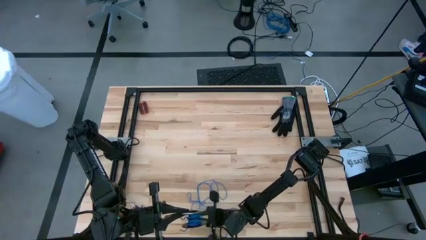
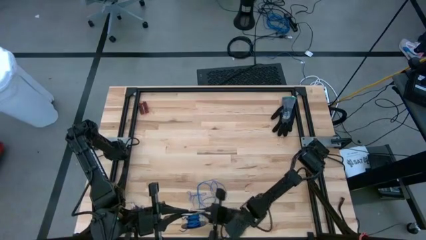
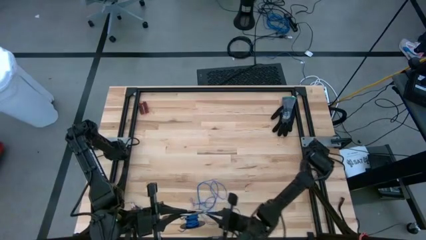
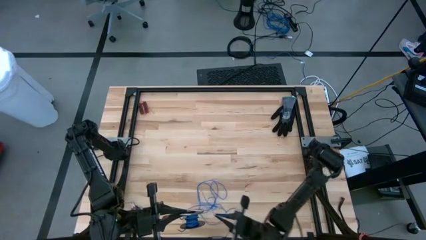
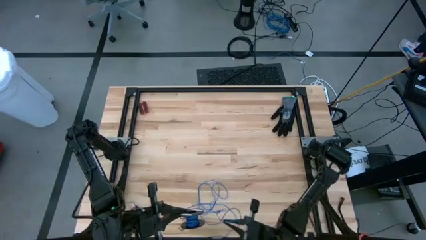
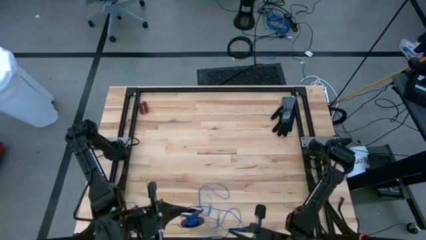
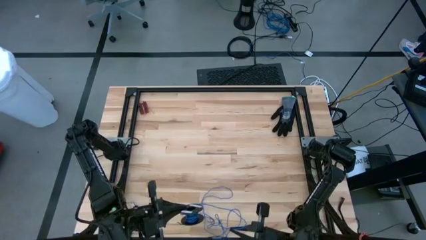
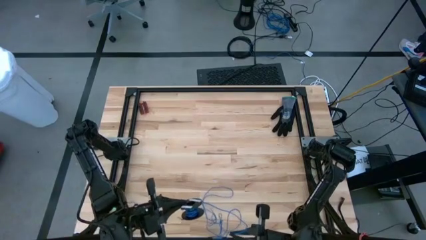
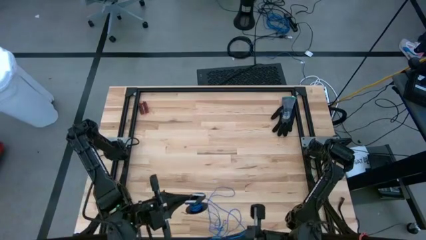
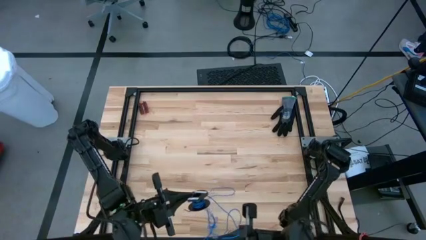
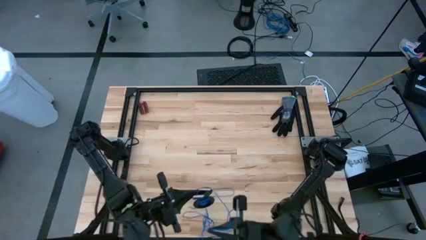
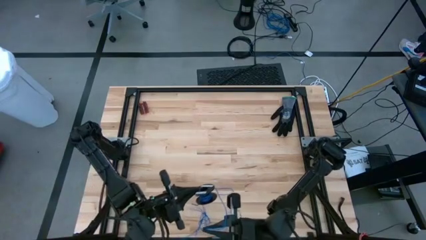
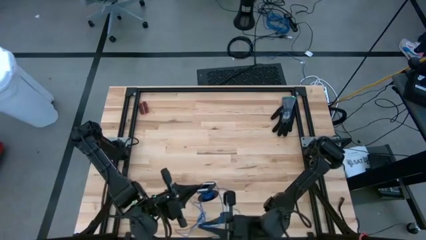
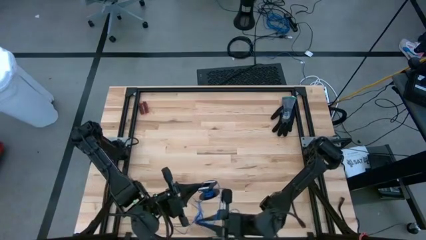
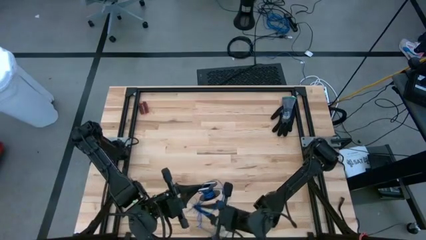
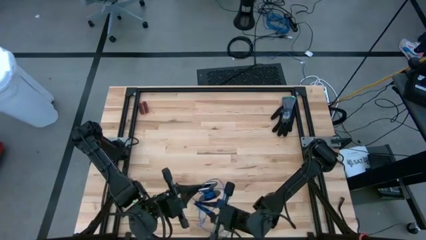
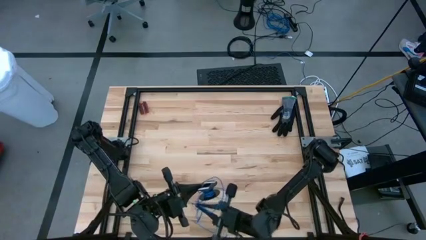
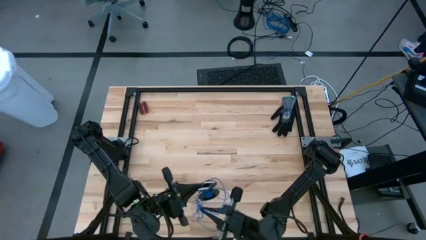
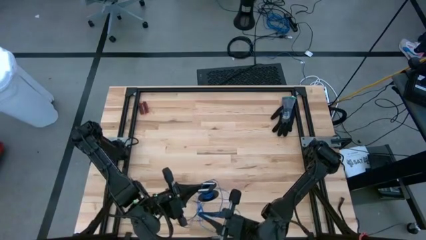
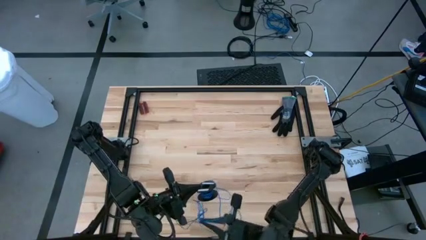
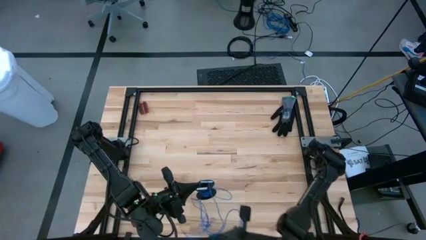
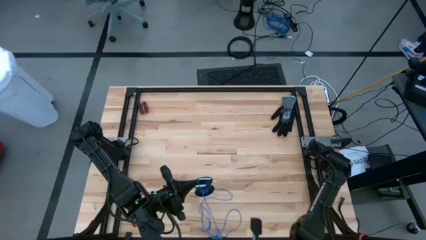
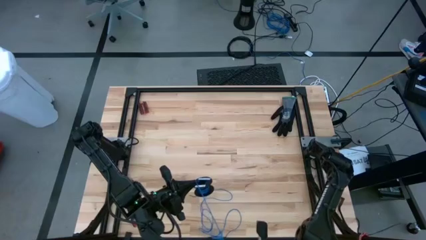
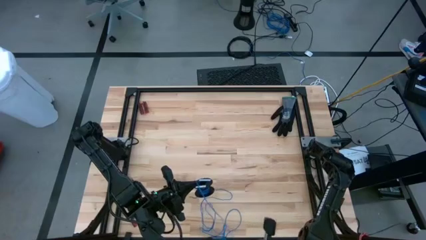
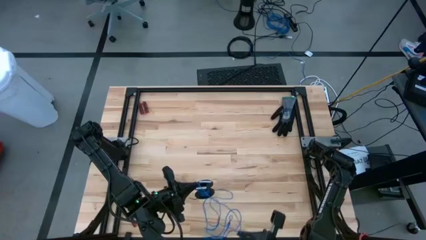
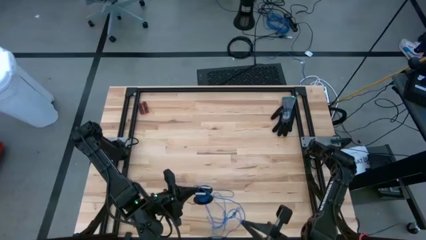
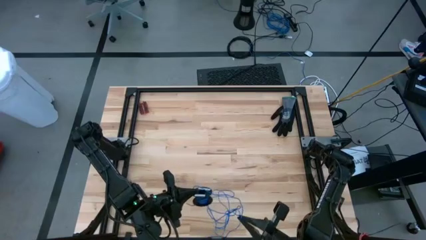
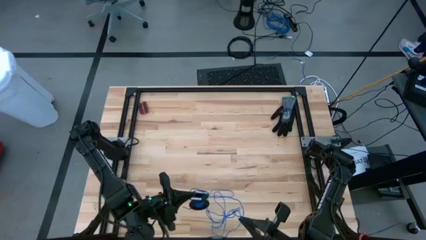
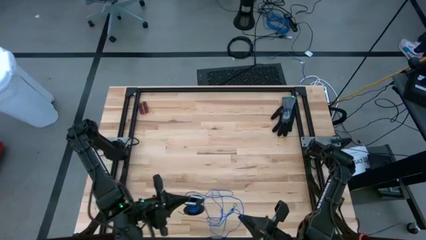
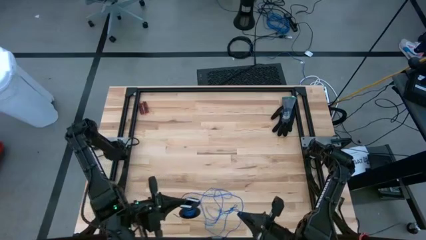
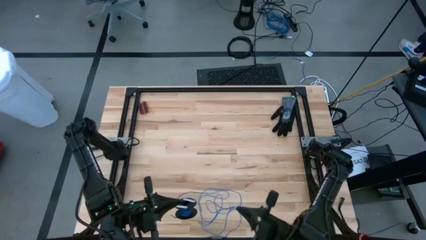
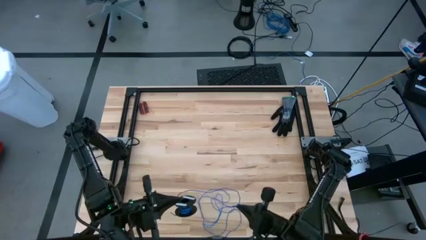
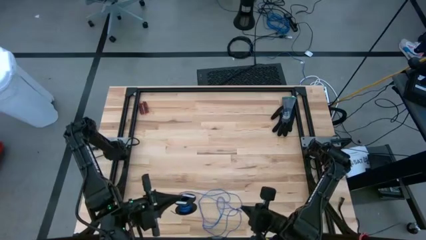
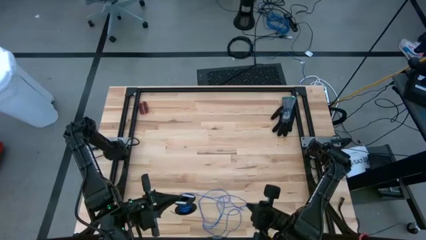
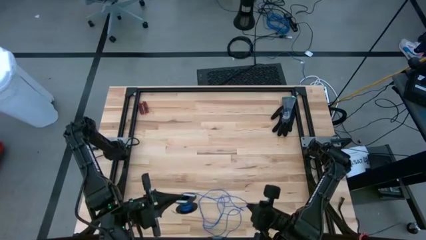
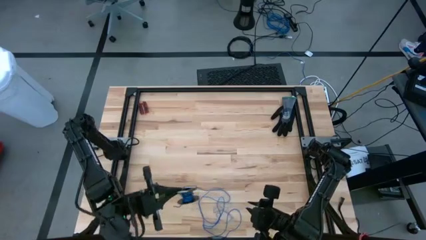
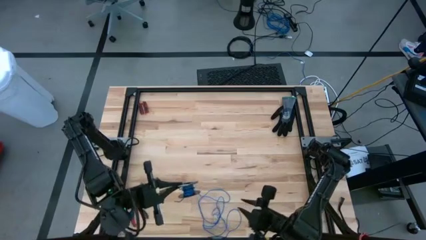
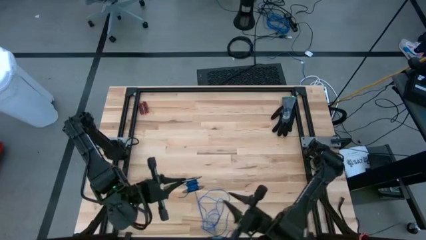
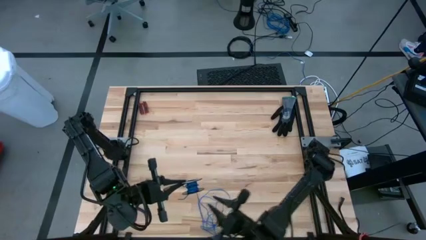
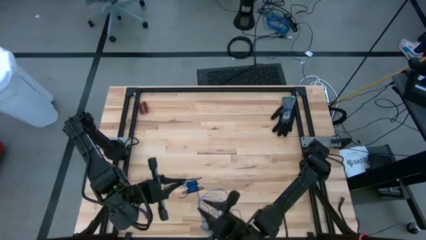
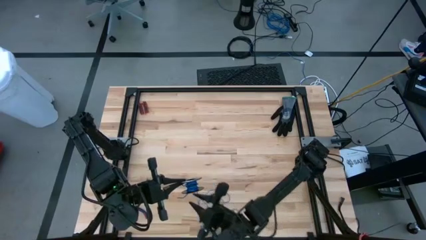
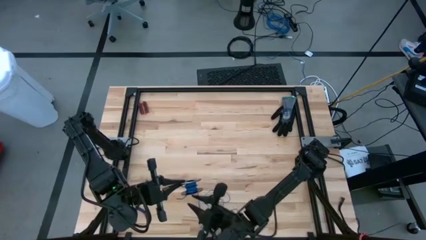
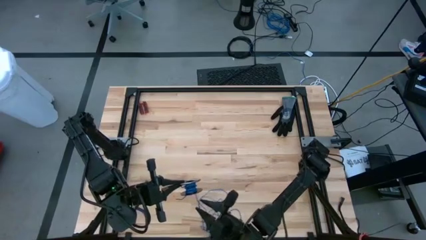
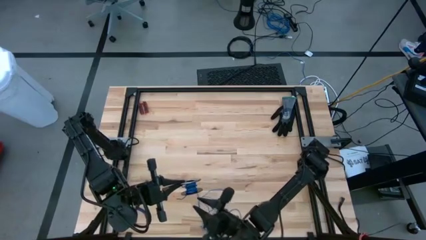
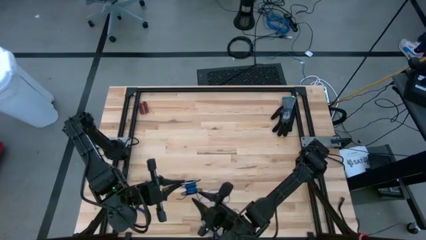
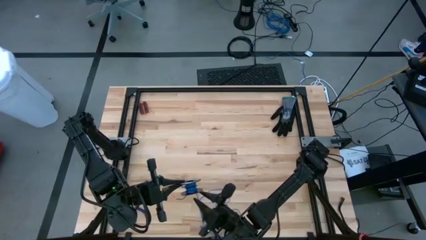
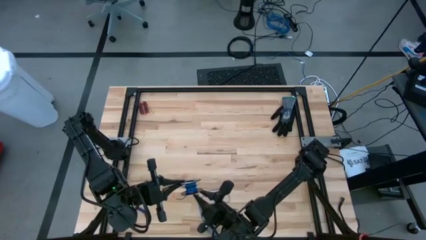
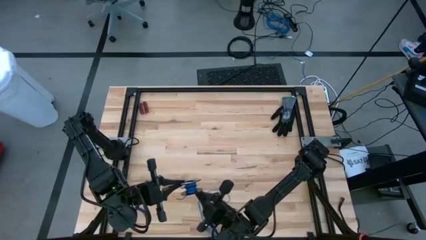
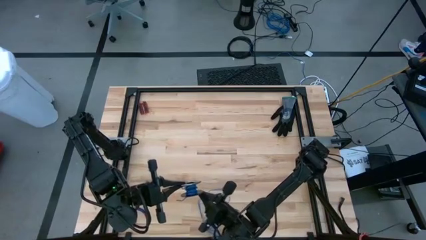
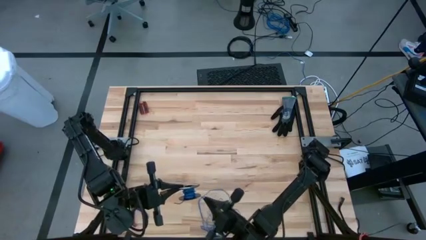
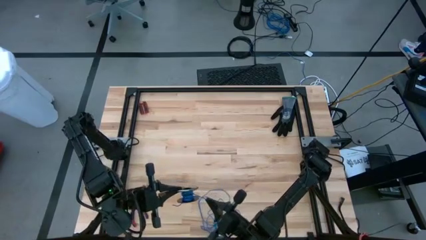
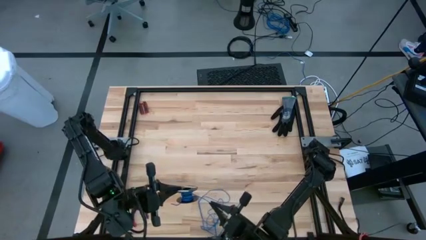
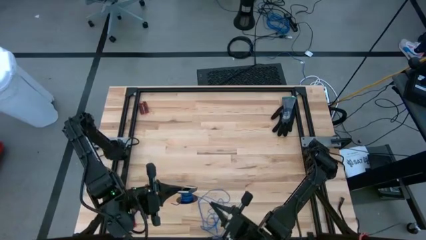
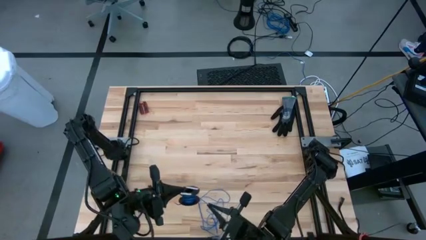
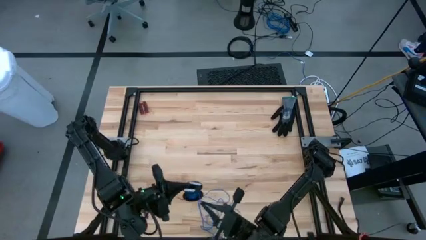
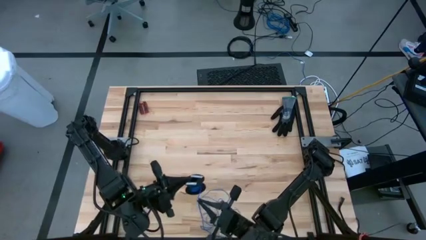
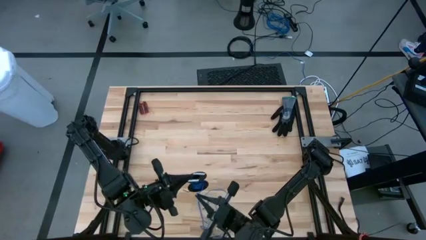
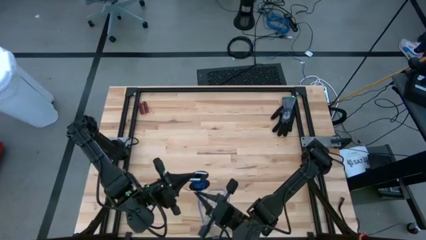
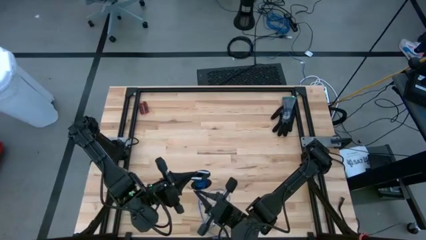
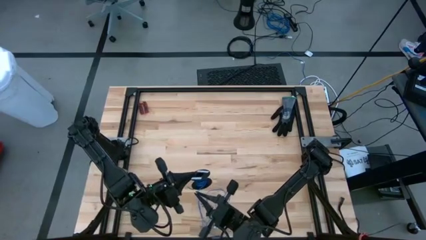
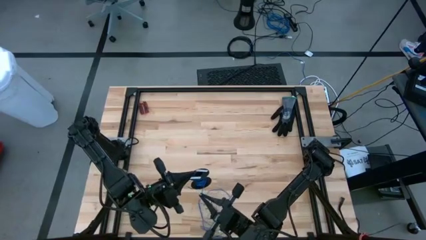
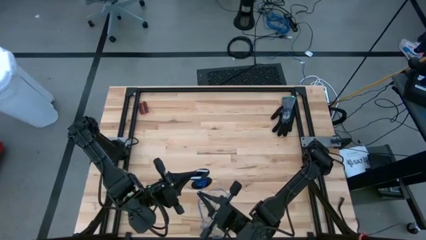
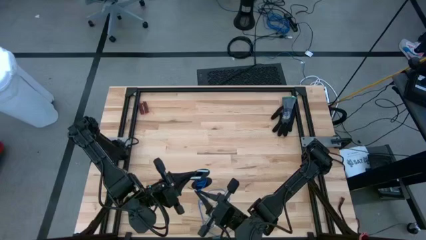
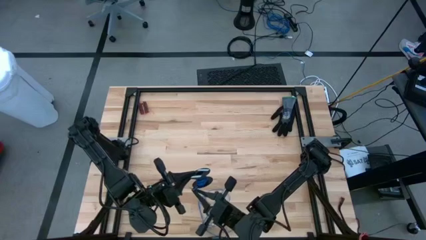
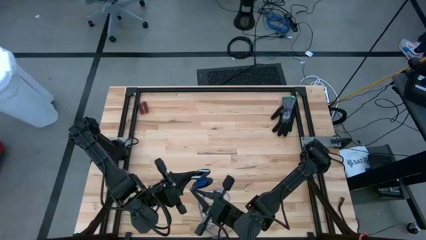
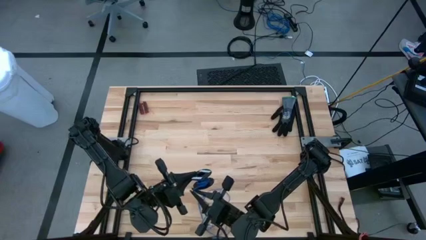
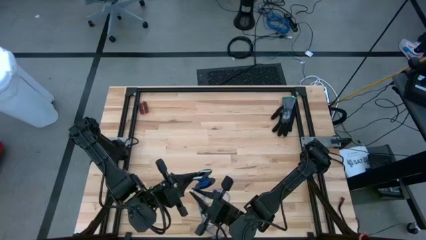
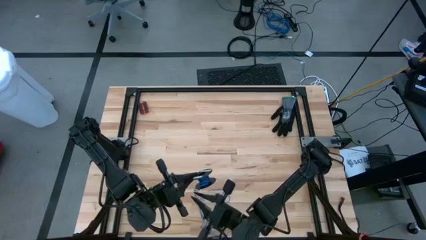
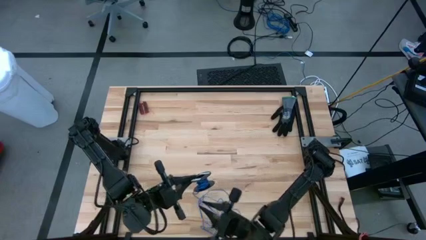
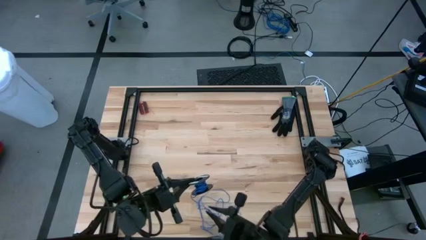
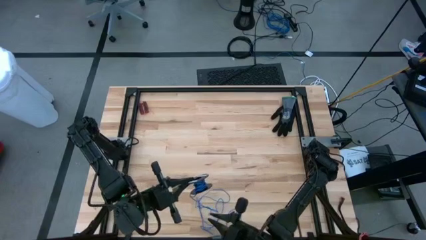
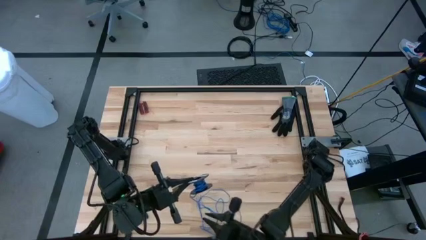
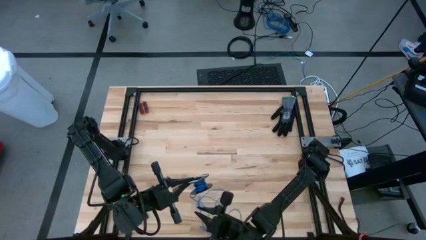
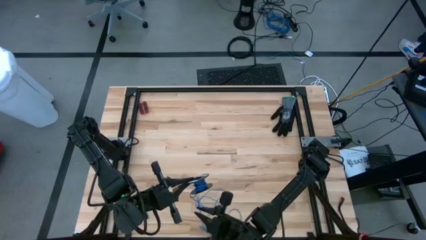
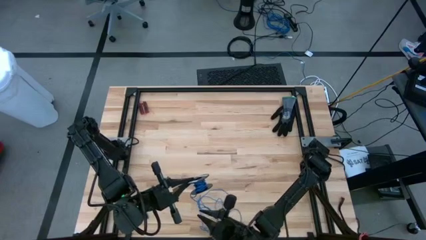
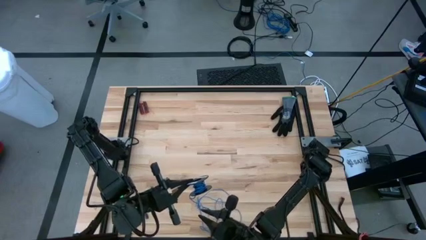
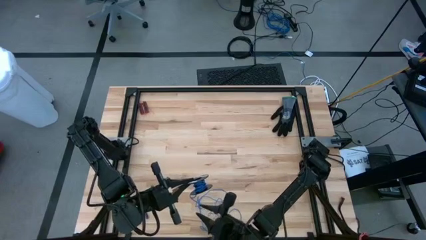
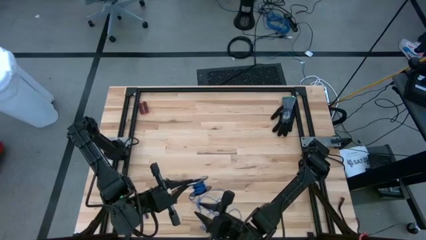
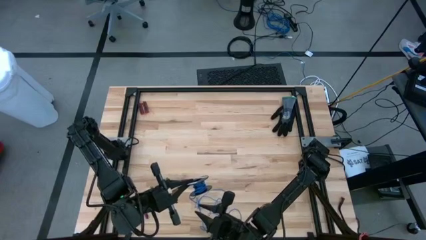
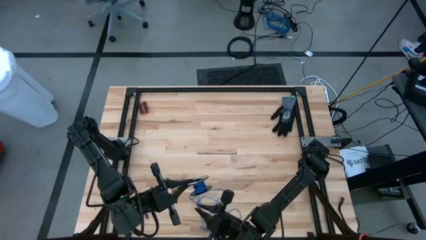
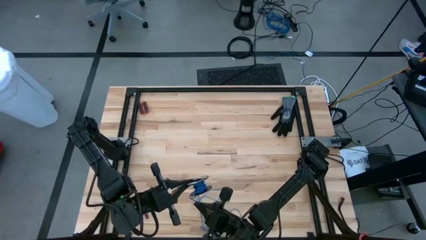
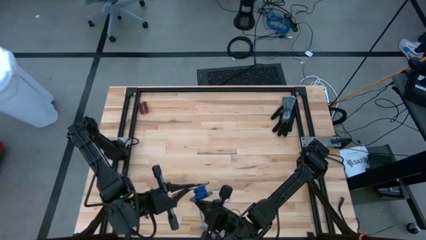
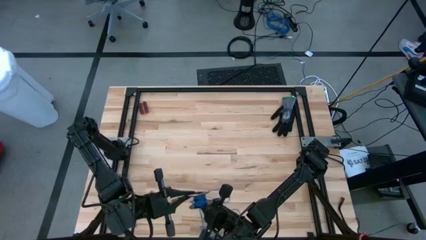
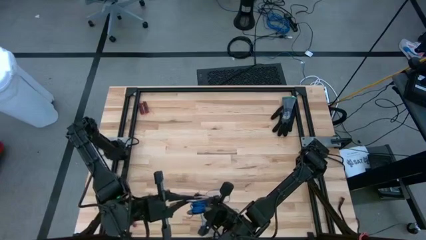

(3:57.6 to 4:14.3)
Task: Coil cords
Coil the blue wire onto a spool
